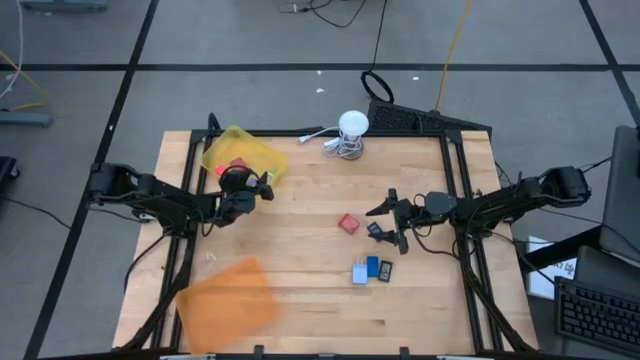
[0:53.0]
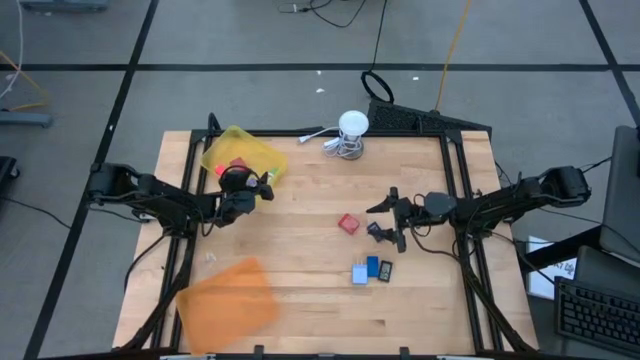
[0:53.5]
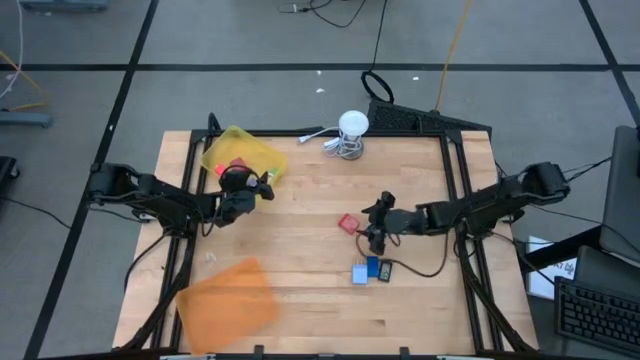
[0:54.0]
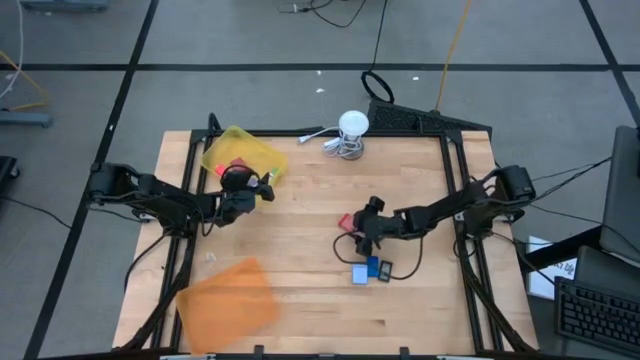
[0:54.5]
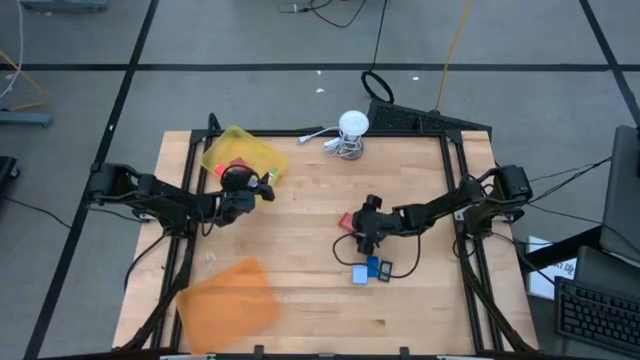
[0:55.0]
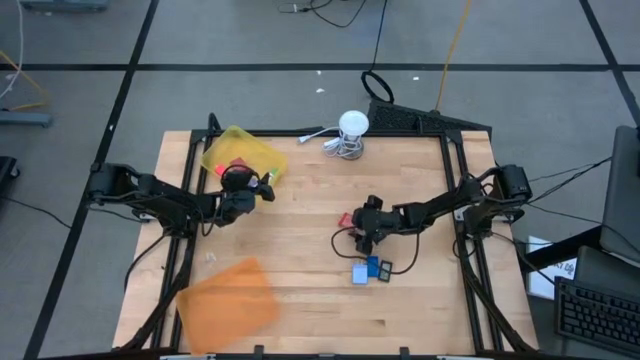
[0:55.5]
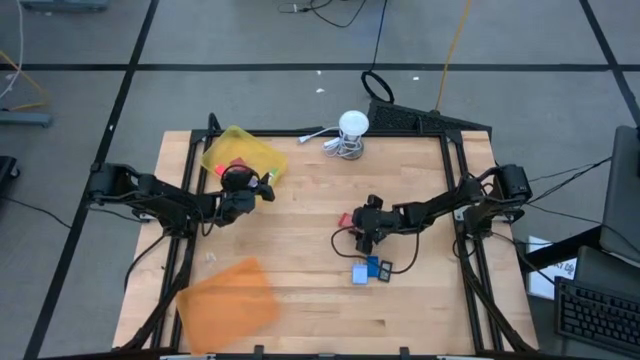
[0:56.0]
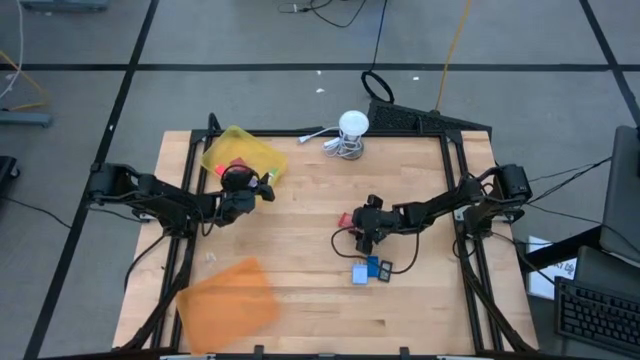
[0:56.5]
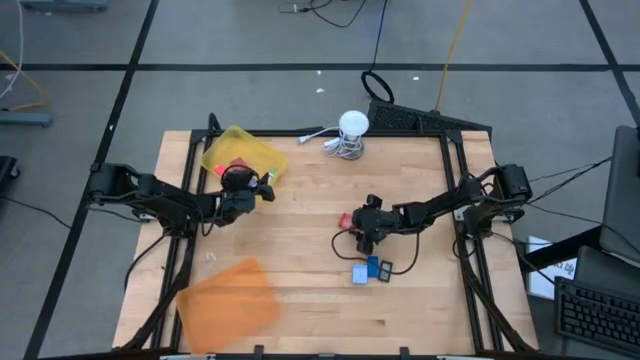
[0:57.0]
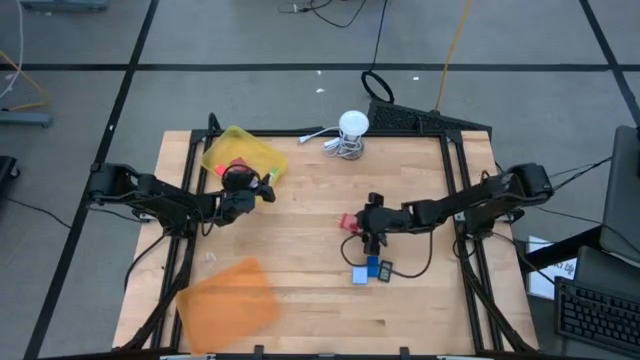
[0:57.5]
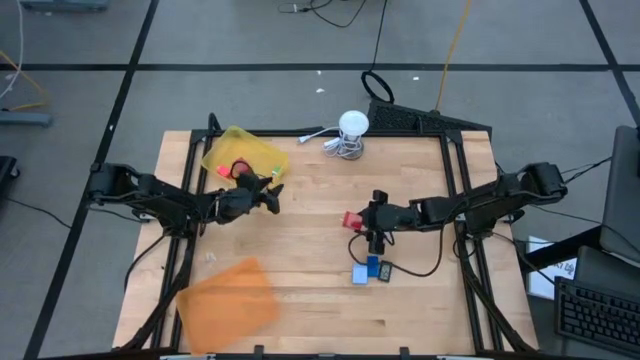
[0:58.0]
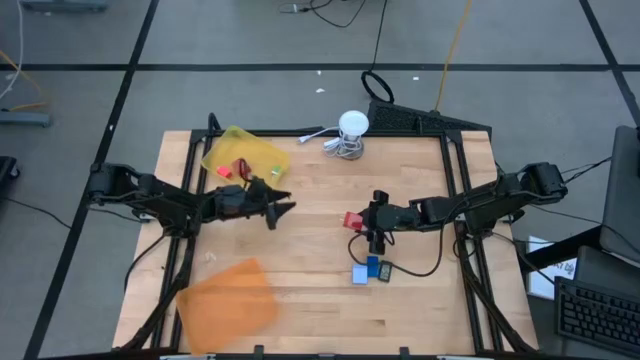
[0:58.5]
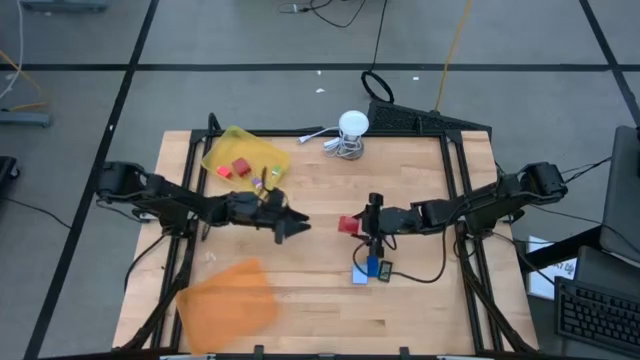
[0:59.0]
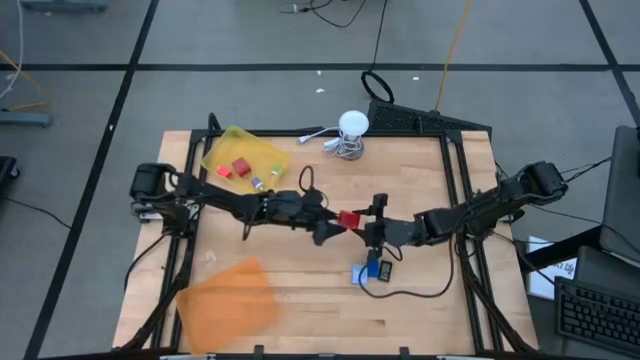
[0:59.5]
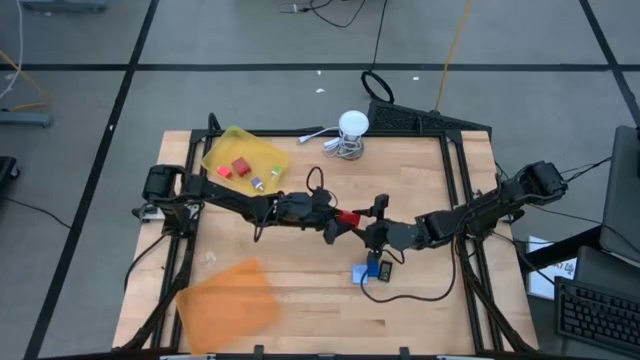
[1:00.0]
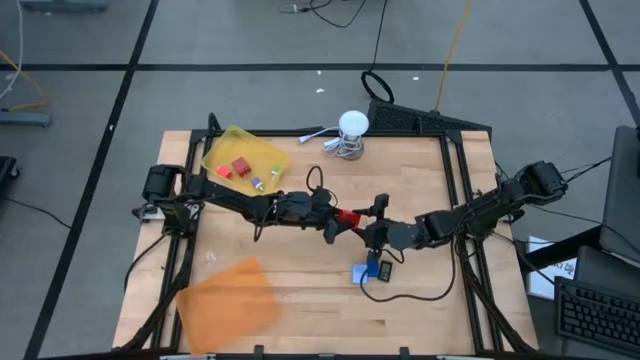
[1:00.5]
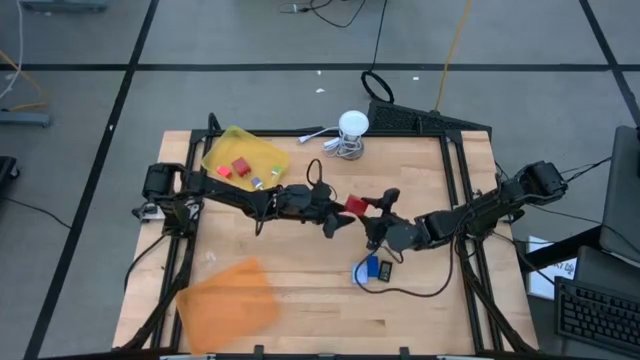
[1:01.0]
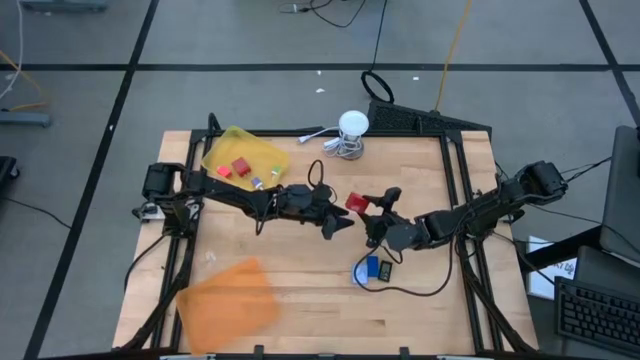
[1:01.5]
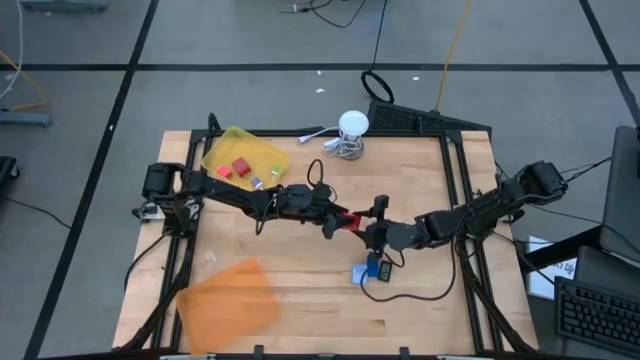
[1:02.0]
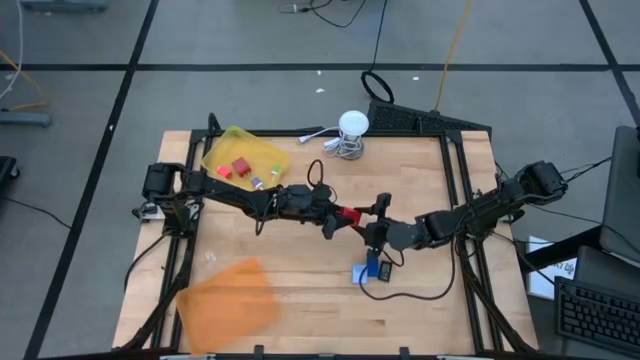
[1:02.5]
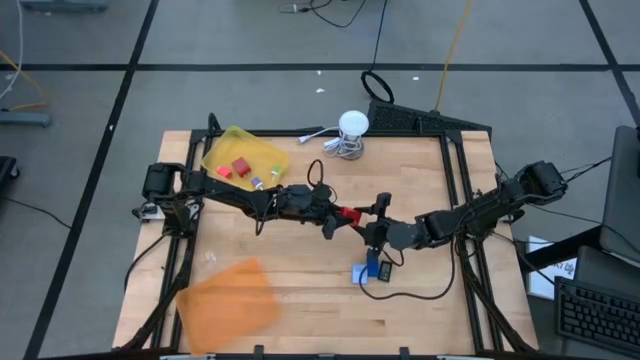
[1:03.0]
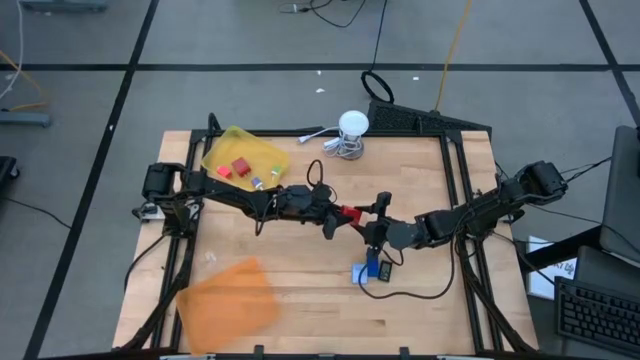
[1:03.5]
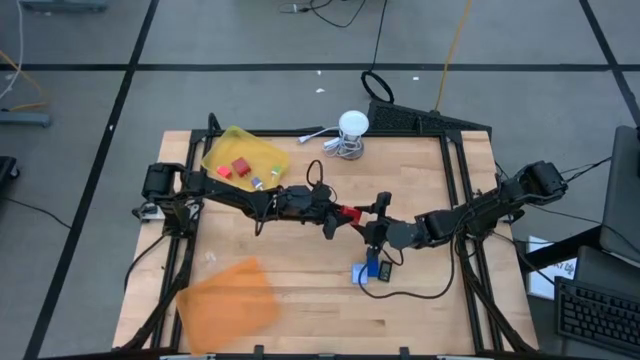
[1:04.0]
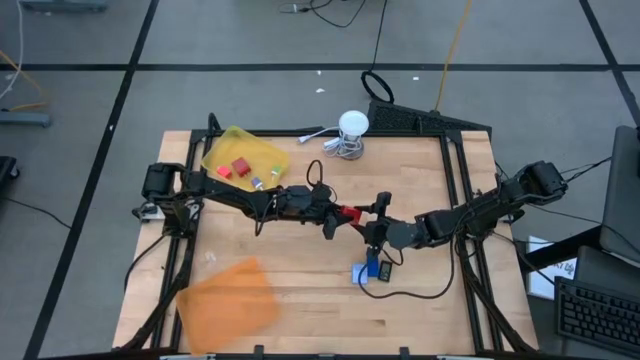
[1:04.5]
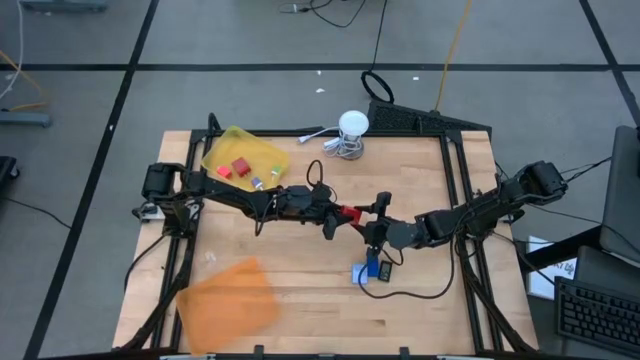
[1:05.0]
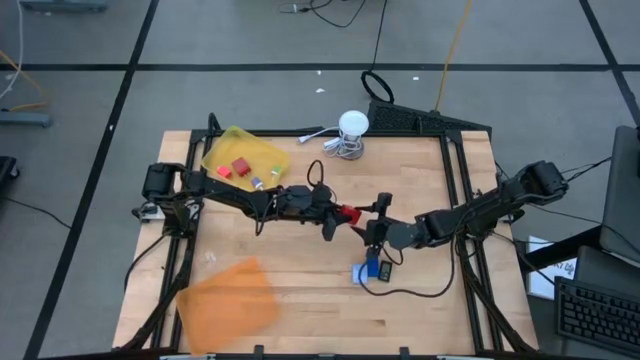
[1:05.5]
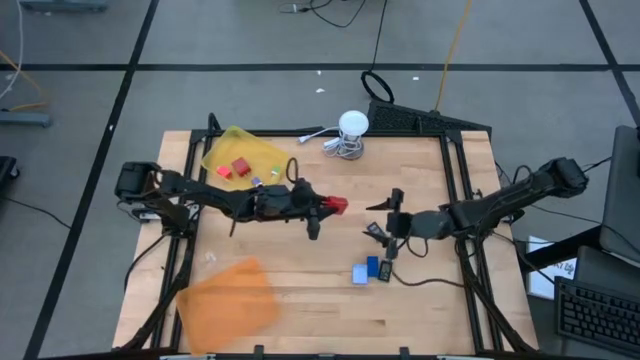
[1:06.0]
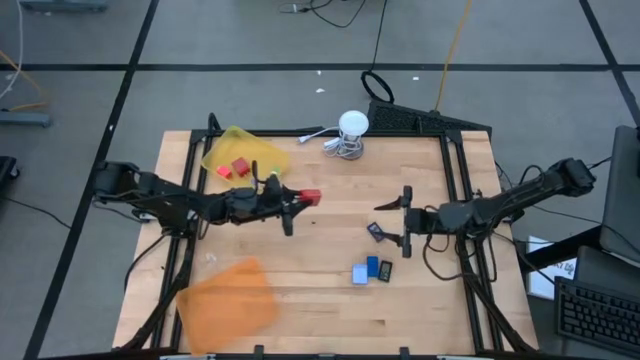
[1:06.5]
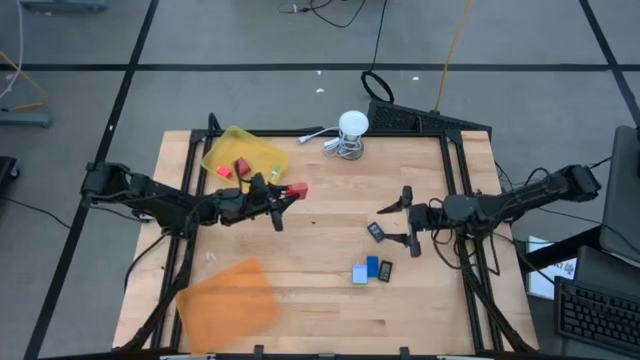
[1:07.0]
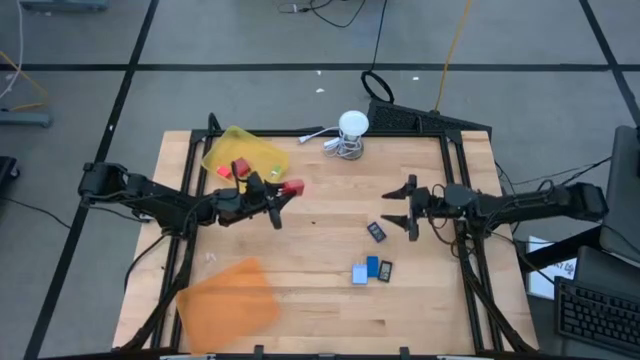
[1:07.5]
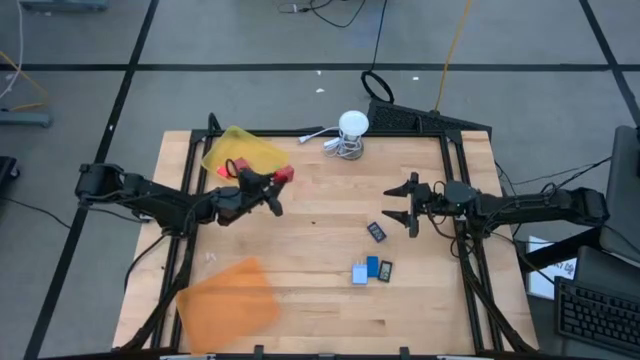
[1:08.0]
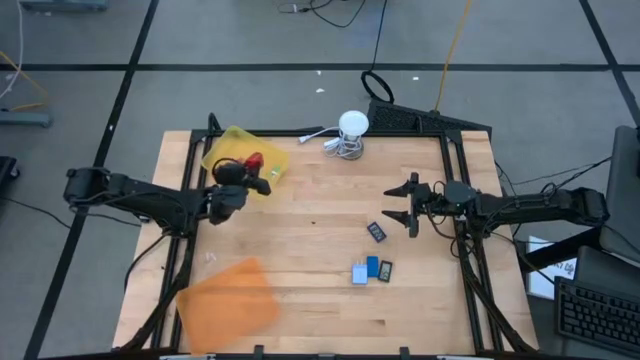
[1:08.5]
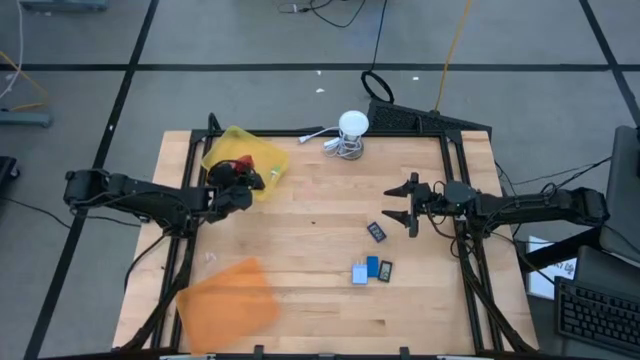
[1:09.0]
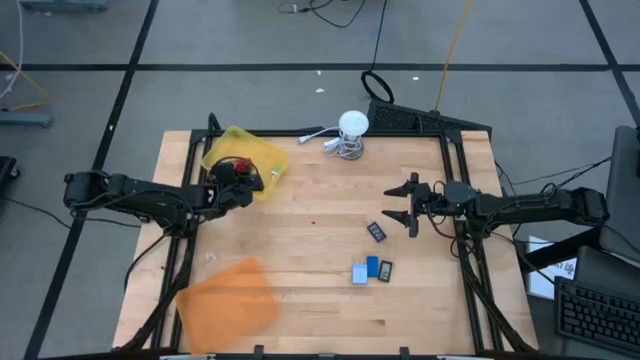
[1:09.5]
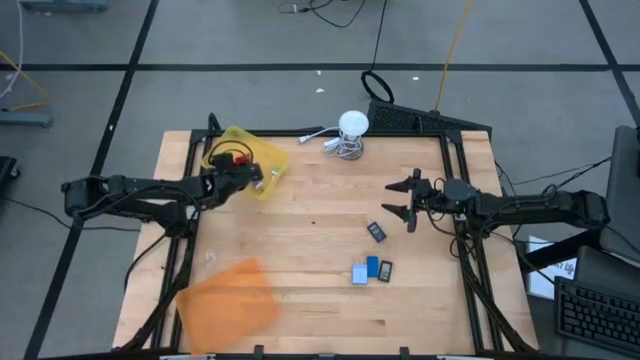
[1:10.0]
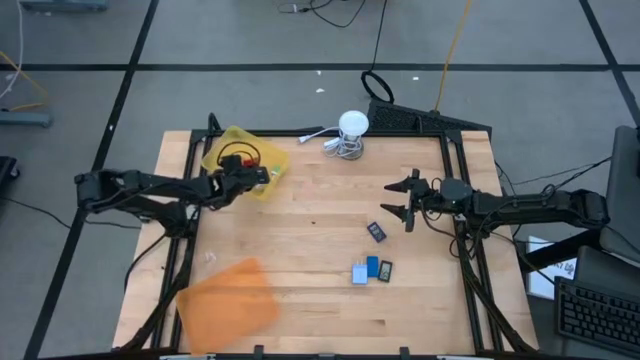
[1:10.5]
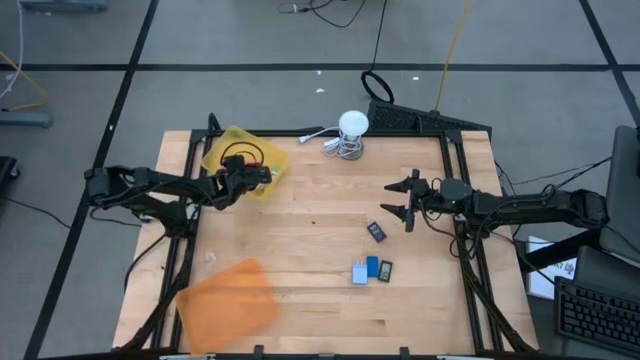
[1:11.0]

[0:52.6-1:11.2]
Task: Pick & Place Office items
Put the red charger adapter into the yellow bin
